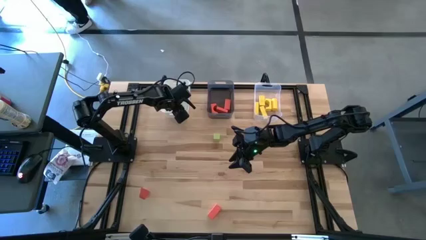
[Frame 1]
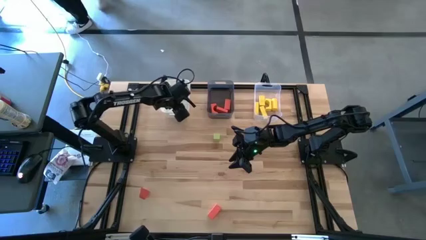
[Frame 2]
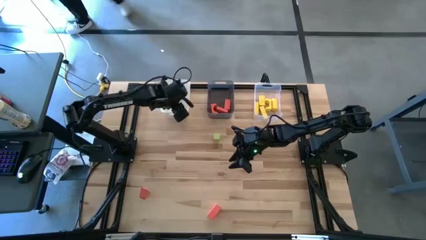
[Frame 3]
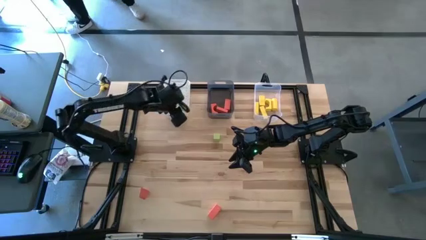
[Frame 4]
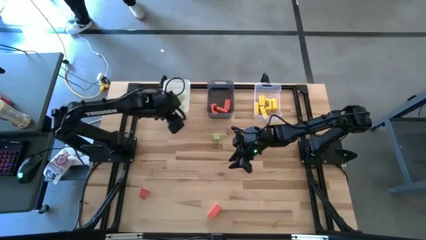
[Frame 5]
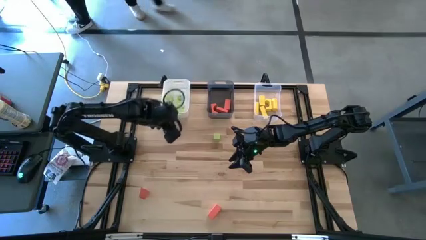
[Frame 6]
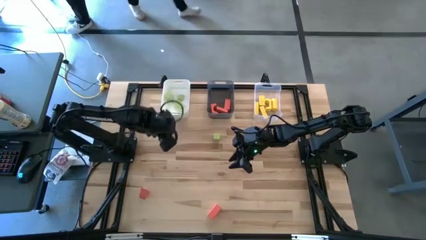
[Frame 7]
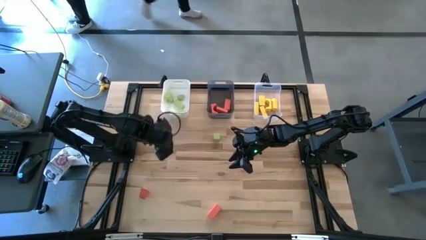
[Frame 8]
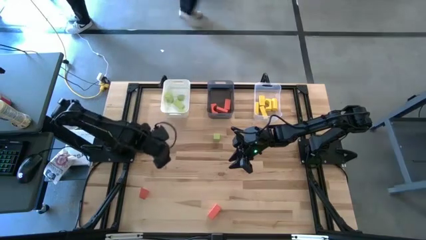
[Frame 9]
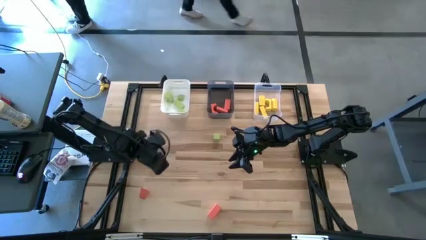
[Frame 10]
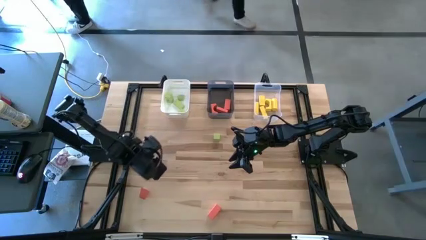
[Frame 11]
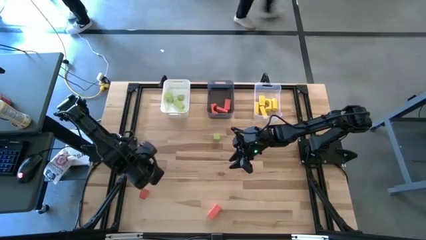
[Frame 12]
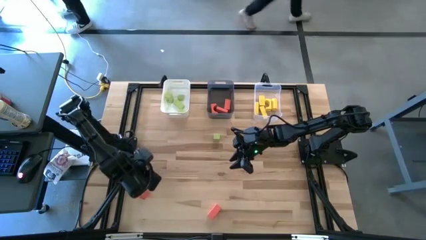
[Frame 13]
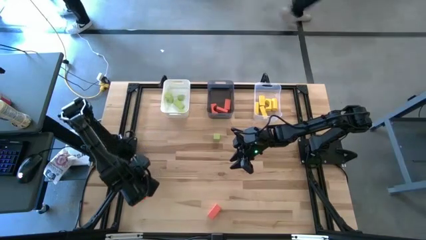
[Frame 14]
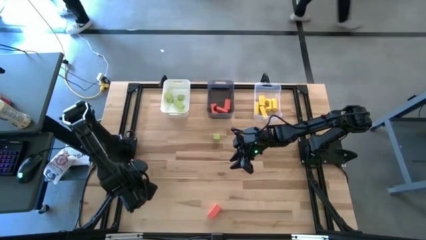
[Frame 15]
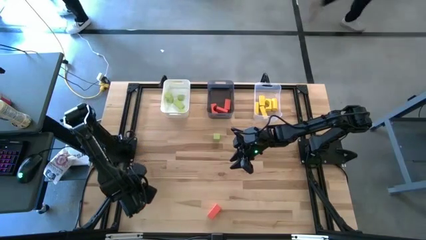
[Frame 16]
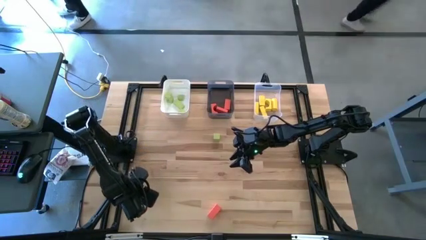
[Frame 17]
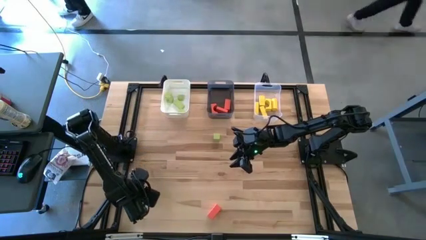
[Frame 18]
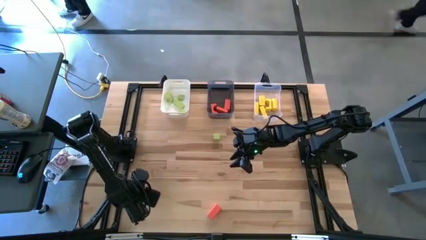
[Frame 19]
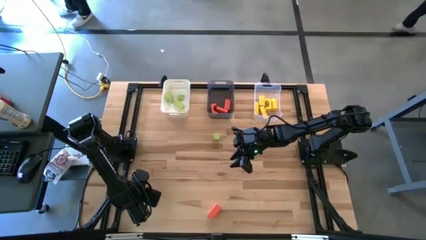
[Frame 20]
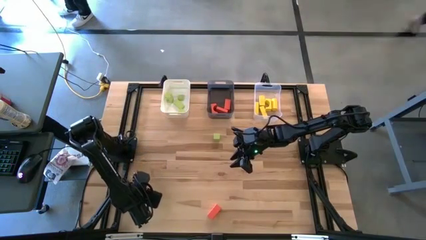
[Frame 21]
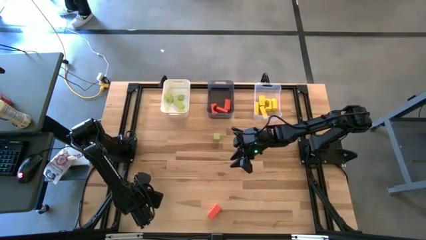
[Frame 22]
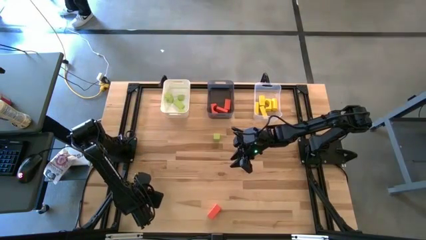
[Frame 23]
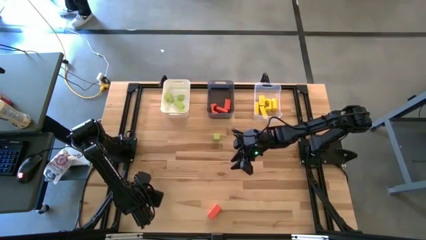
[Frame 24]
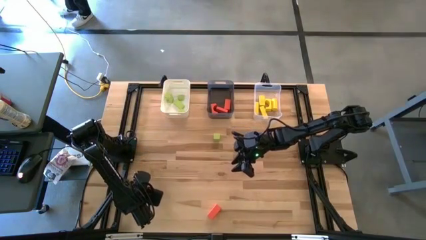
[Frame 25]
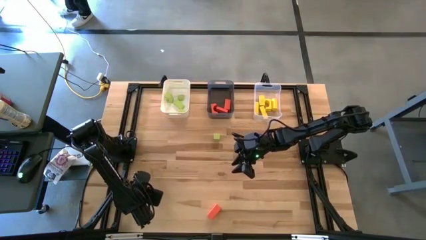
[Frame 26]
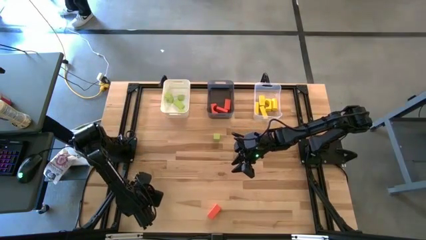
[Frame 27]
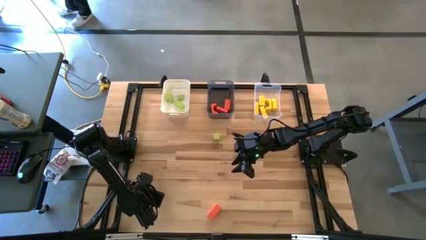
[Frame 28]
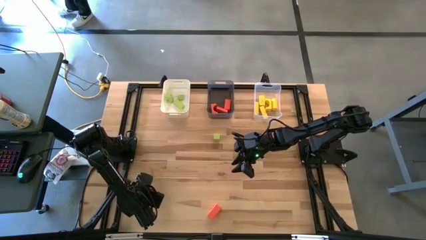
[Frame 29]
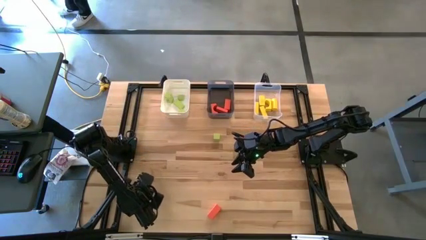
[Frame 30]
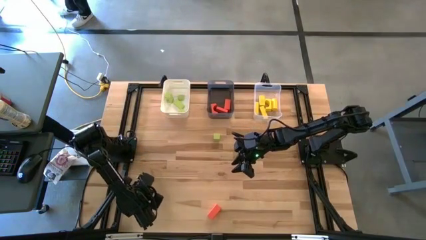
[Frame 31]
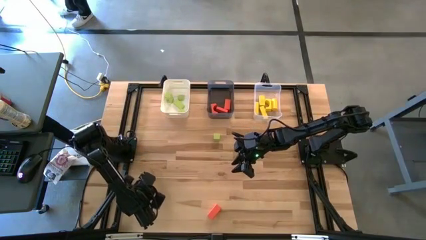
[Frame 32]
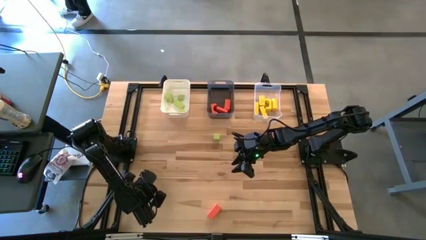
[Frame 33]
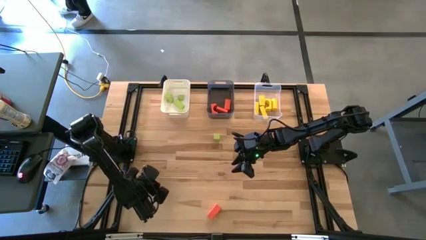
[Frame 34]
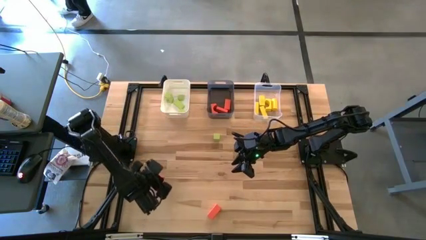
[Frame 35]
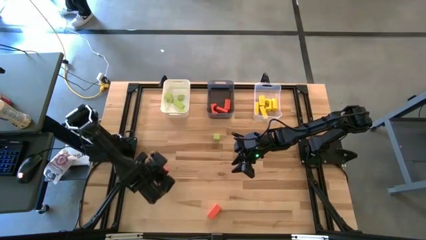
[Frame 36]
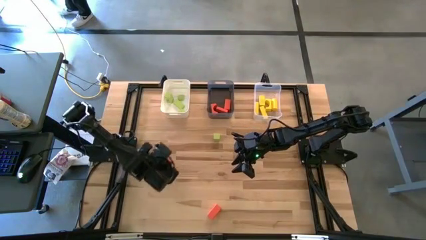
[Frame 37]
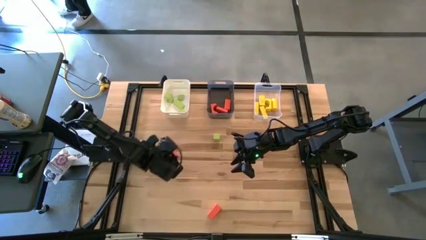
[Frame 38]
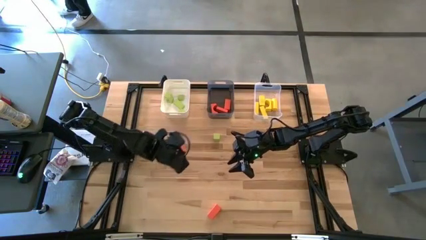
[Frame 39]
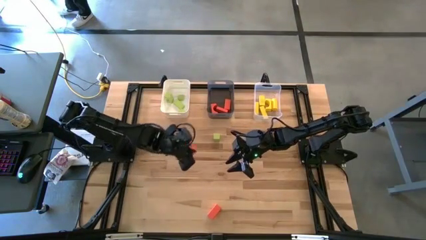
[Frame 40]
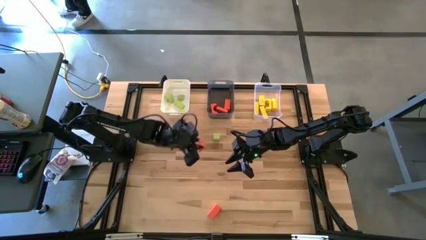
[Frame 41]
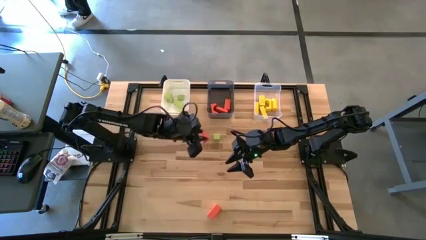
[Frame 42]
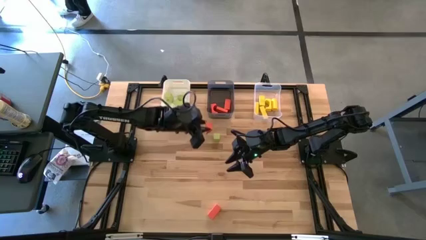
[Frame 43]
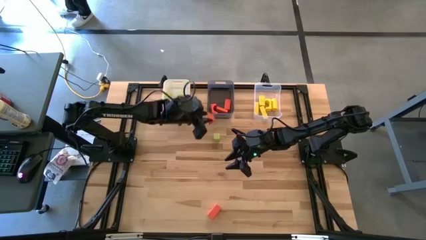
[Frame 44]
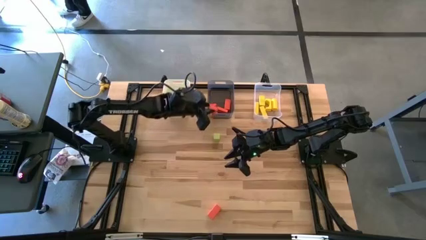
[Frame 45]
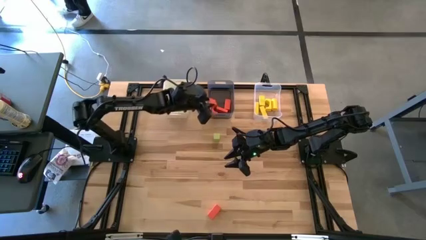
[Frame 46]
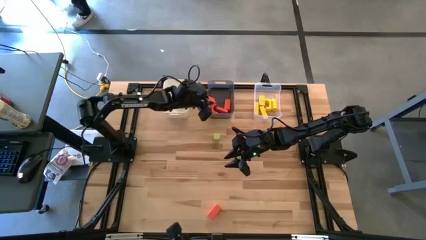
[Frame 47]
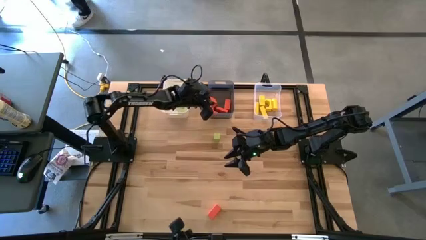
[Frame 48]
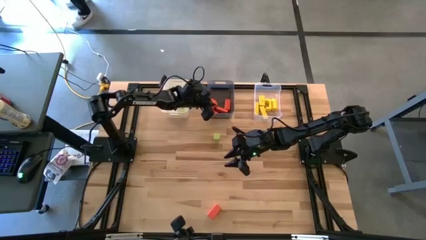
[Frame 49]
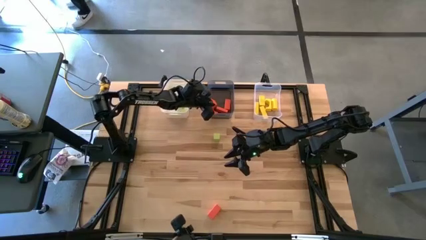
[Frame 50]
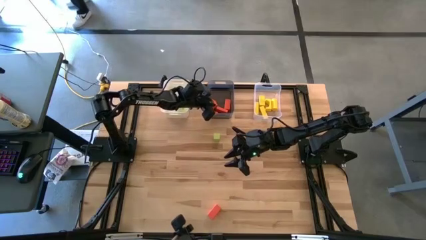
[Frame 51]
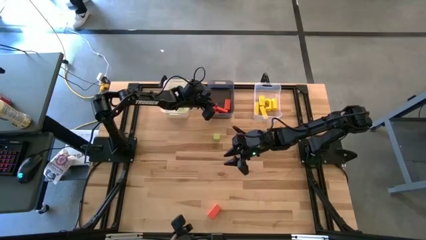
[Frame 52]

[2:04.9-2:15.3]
Task: Sort & place blocks by color
Put the orange block into the black bin

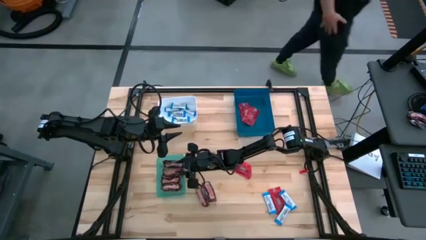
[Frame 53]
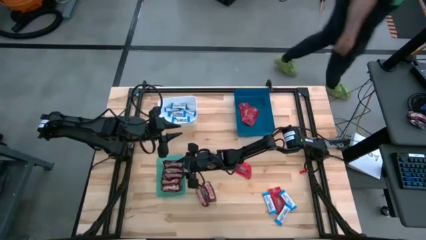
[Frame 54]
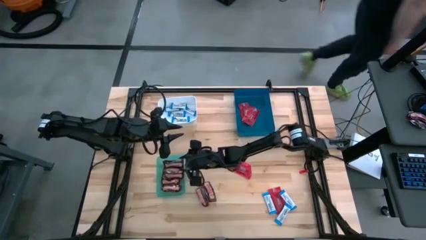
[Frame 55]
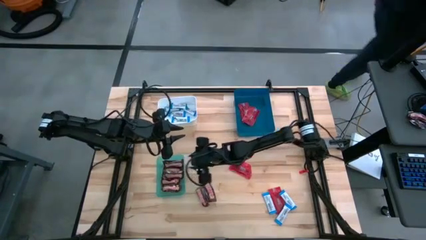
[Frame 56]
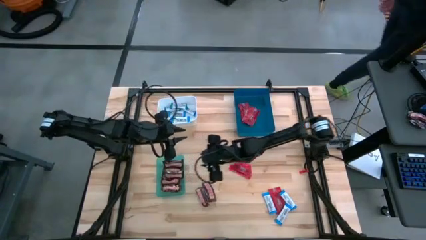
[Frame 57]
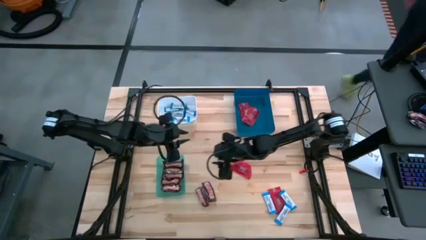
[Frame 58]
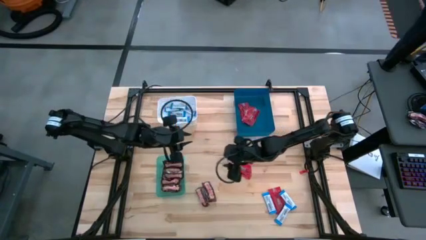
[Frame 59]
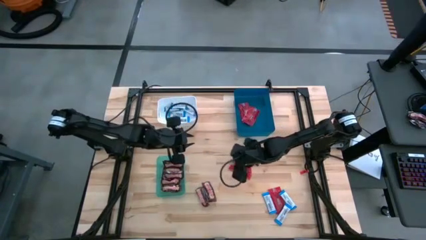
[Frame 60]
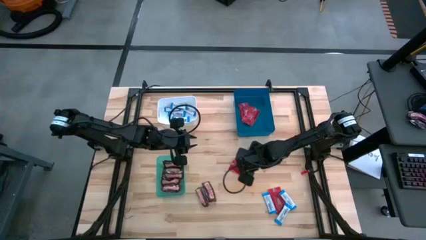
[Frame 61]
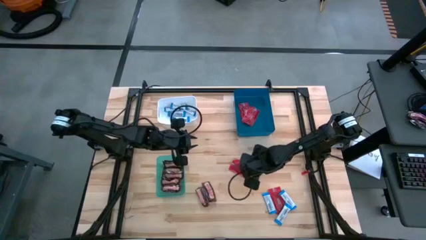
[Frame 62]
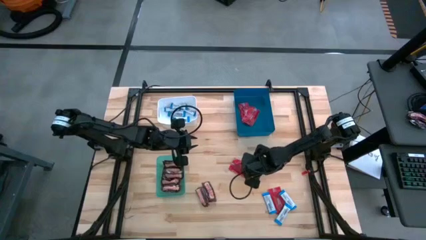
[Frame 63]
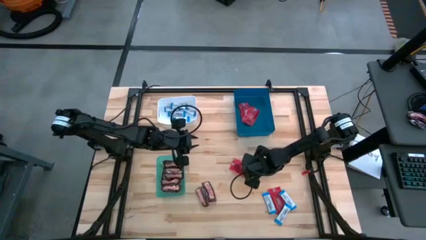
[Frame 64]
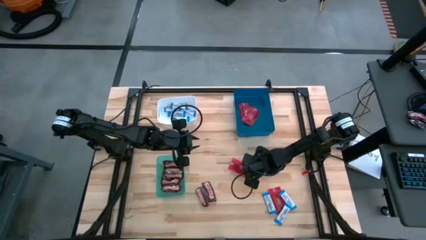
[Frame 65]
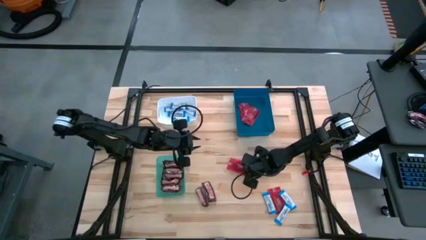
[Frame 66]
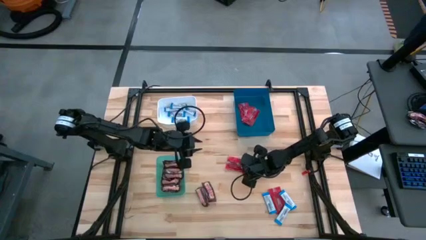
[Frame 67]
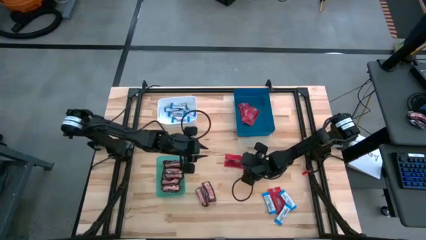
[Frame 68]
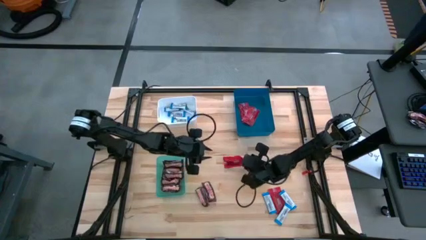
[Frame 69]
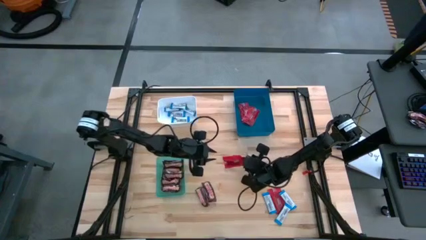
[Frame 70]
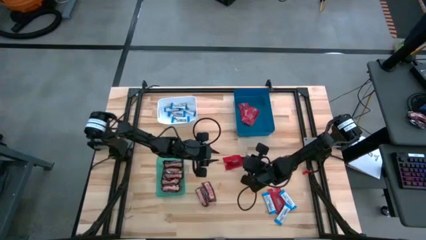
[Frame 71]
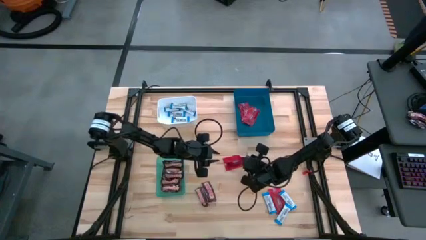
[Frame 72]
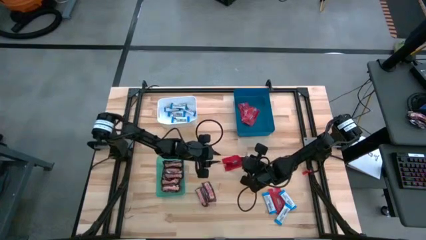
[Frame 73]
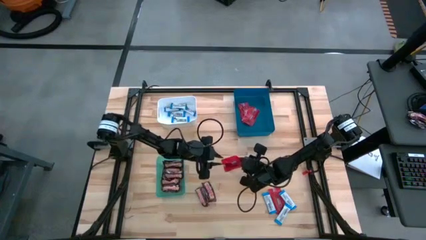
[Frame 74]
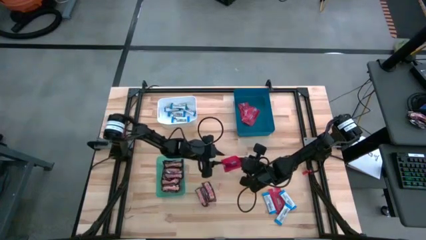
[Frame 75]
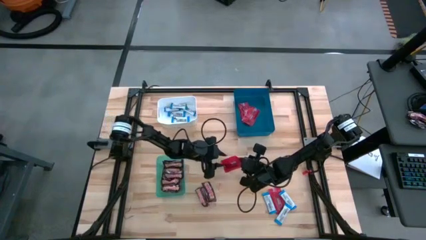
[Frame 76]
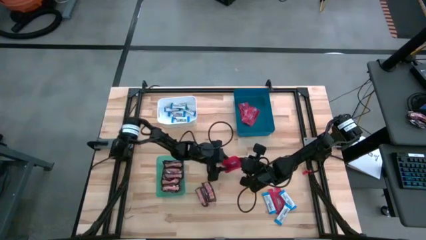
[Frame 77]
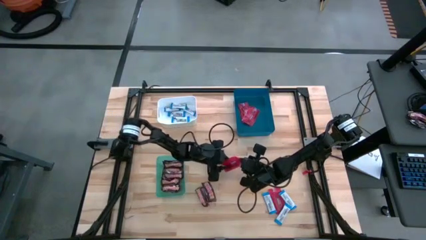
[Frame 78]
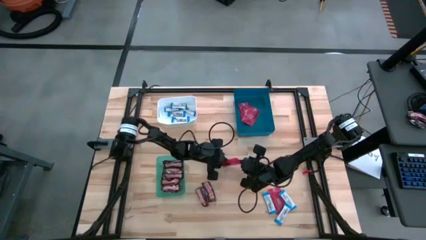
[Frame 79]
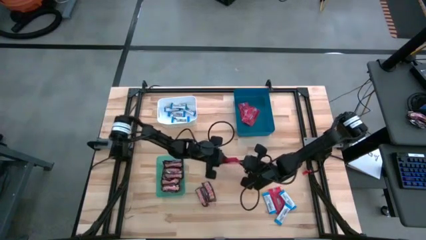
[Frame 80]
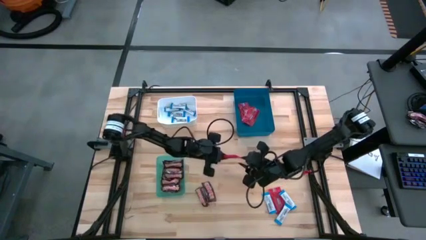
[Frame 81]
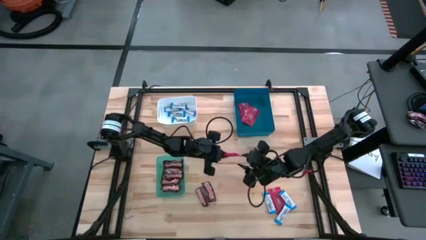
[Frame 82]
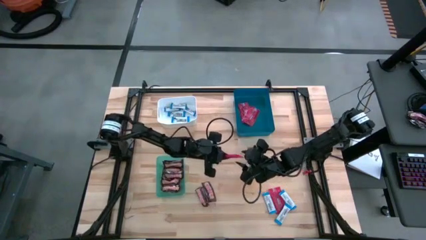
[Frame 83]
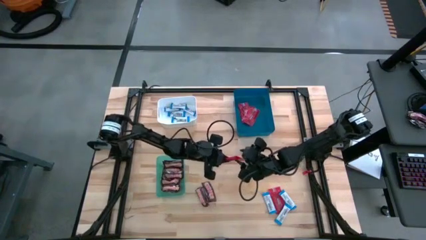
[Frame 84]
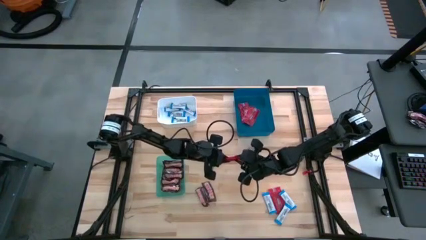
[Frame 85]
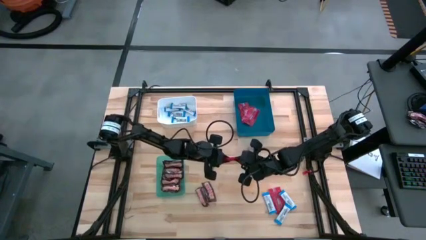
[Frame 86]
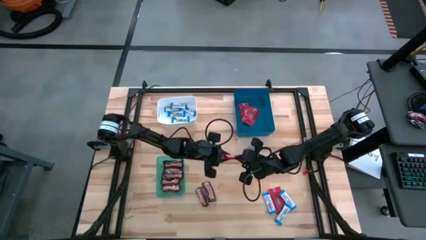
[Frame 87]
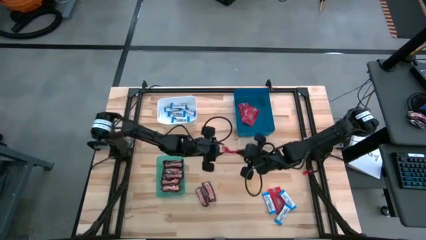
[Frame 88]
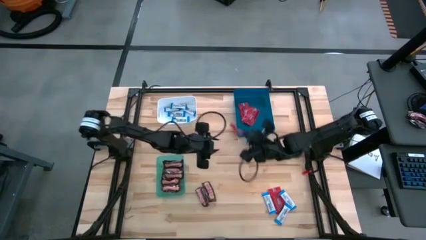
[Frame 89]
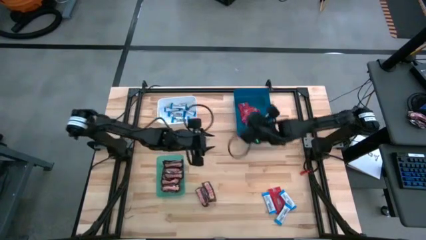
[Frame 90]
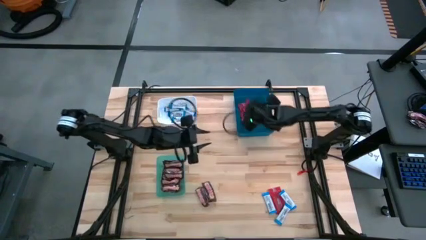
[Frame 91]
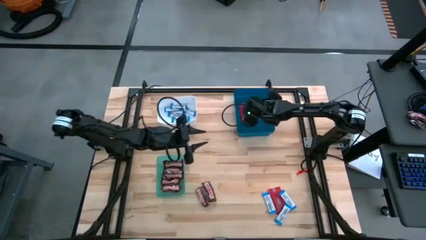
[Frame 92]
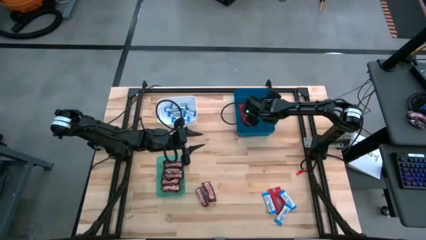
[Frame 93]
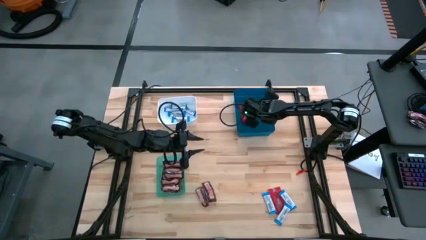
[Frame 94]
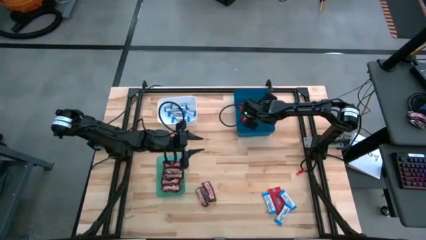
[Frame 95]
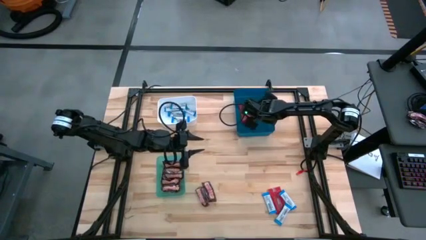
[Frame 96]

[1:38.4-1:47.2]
Task: Sort candy
Put the red candy into the blue bin
